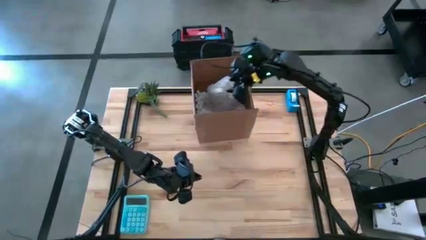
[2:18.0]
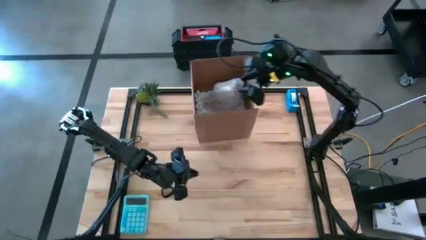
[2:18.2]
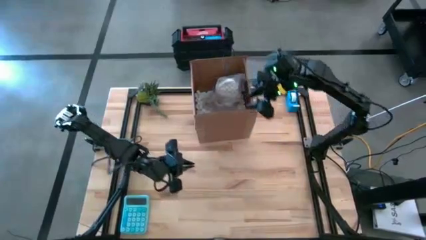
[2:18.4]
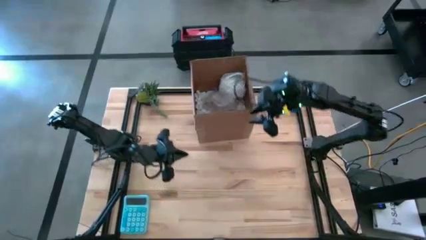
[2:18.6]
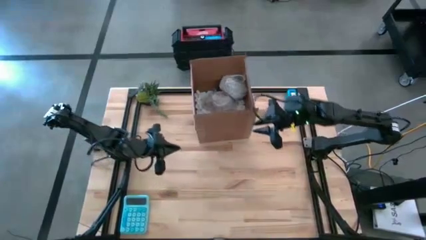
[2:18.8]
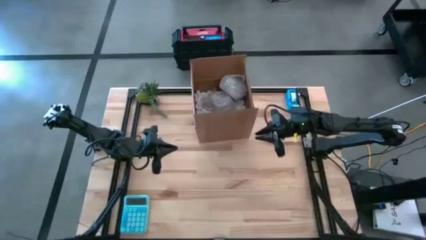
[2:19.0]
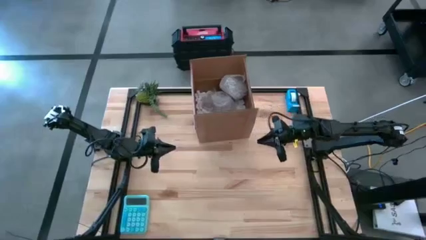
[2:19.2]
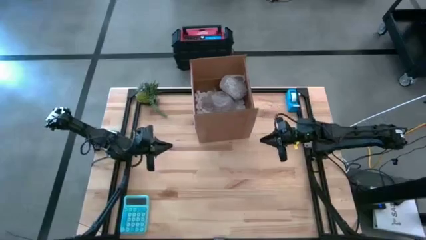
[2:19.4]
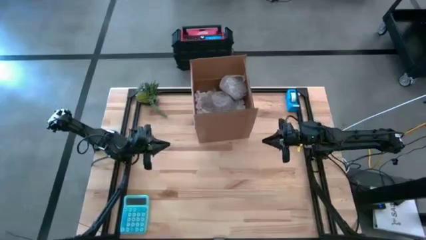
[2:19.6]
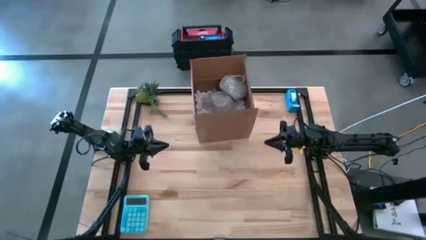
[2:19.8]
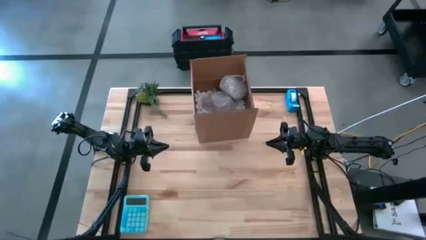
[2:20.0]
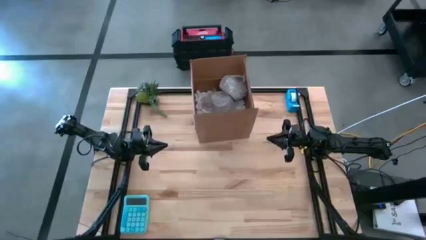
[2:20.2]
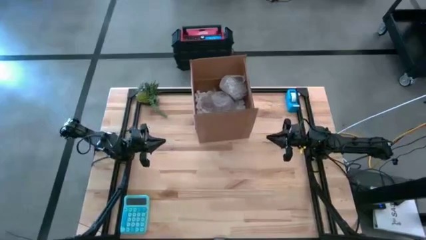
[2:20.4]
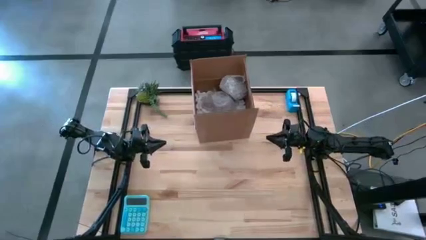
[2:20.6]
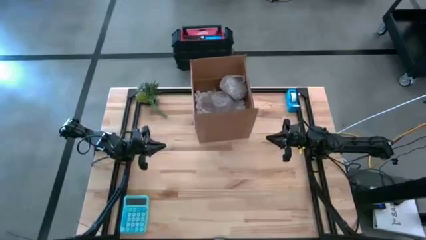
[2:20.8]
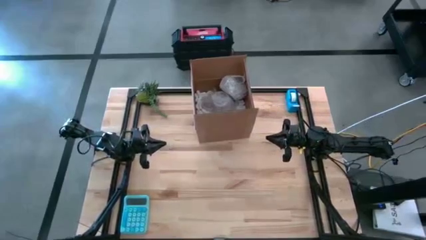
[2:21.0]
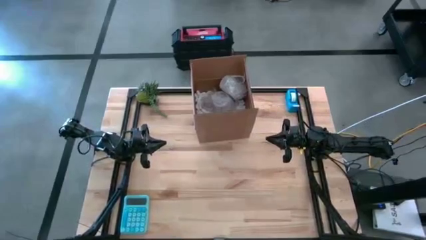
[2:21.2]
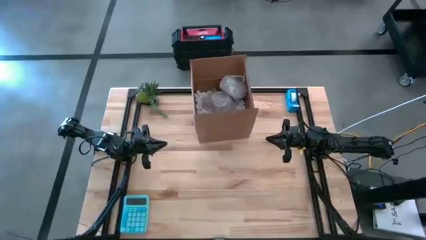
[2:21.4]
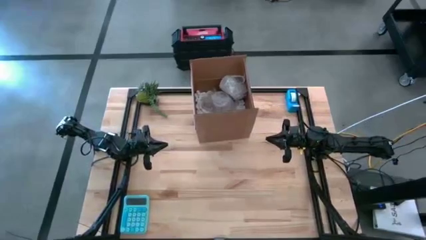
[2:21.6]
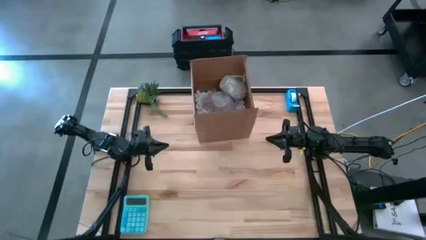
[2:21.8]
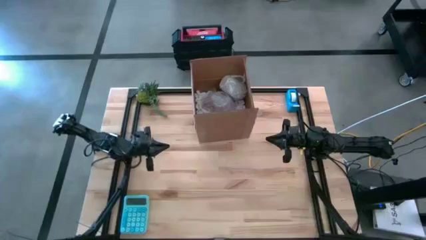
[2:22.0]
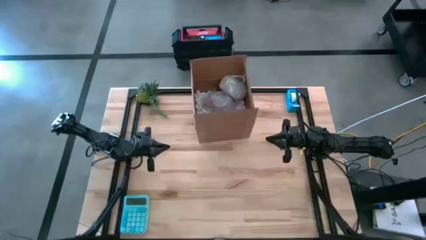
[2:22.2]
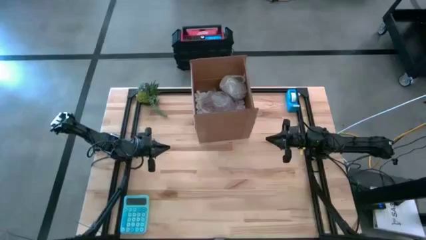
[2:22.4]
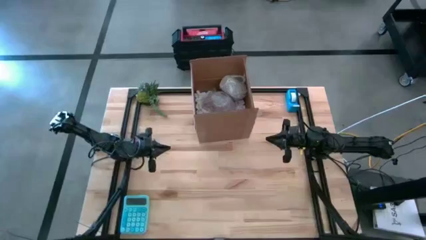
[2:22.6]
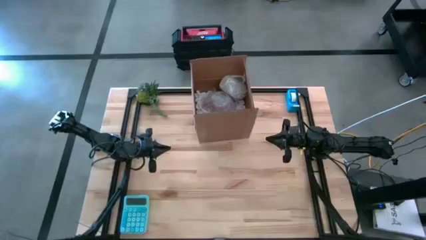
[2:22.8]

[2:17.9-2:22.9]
Task: wrap mug
Return to Home Position

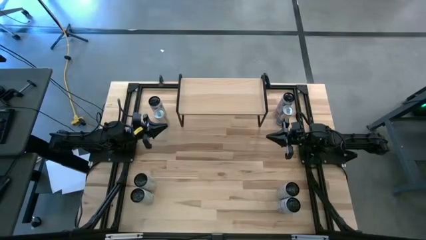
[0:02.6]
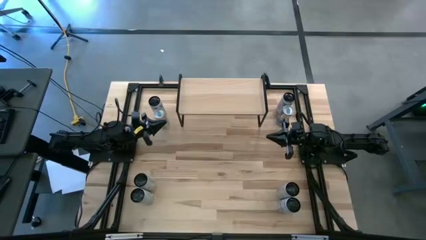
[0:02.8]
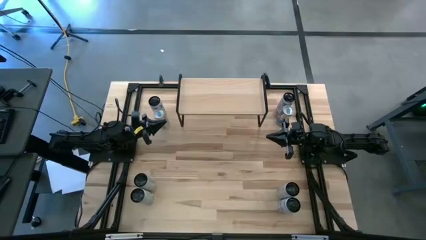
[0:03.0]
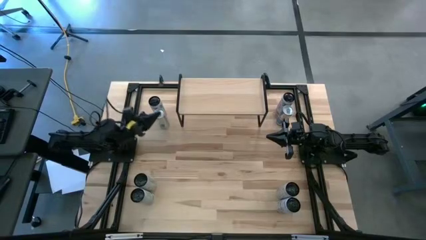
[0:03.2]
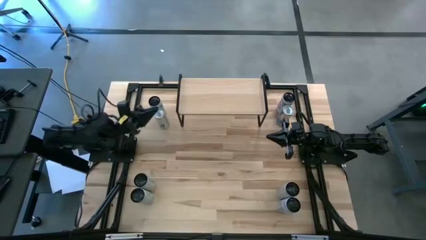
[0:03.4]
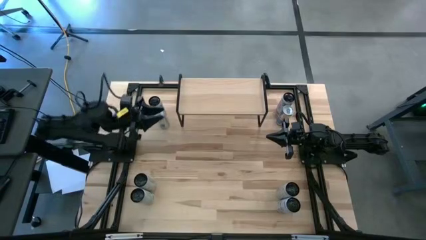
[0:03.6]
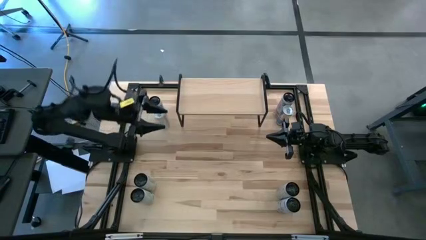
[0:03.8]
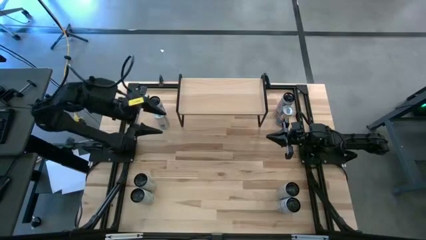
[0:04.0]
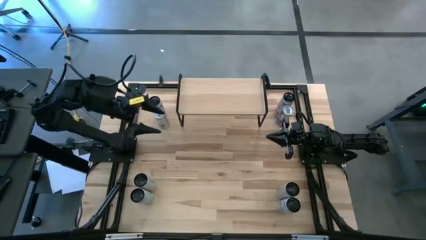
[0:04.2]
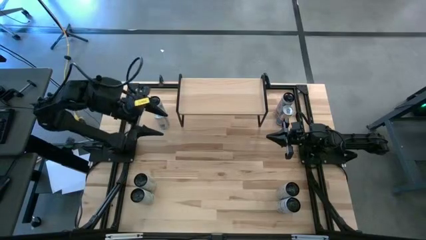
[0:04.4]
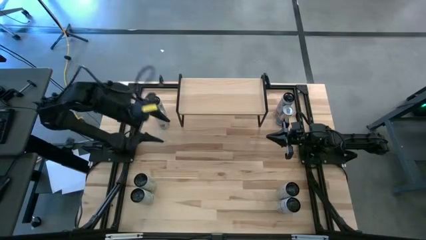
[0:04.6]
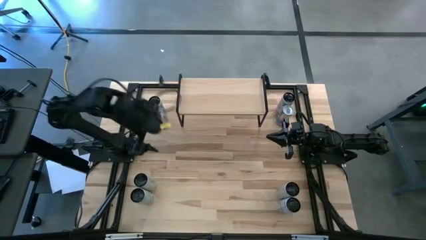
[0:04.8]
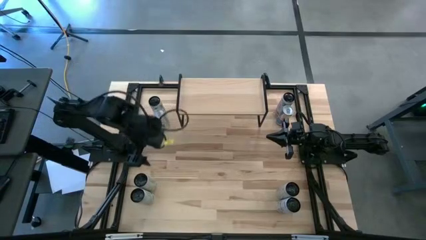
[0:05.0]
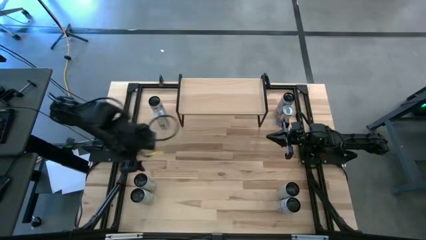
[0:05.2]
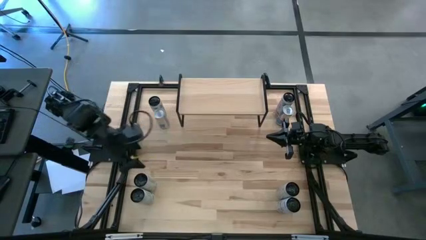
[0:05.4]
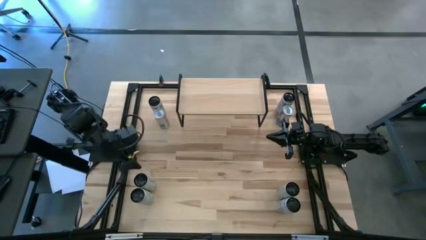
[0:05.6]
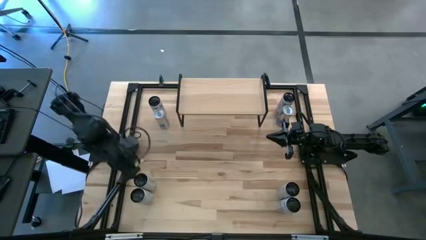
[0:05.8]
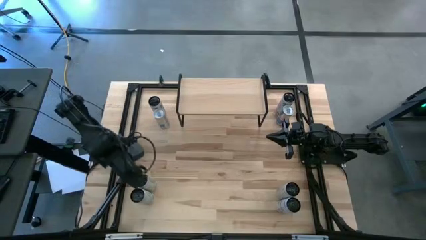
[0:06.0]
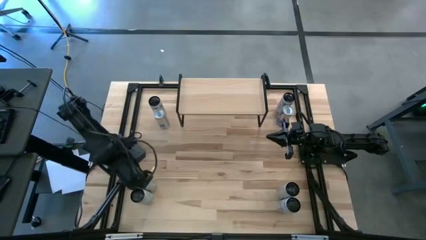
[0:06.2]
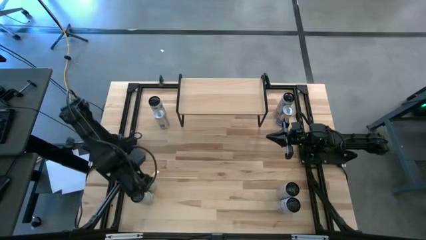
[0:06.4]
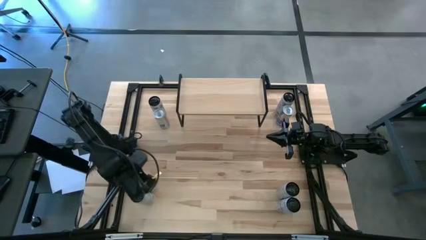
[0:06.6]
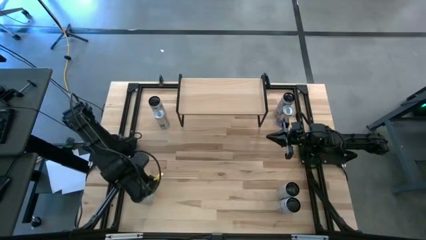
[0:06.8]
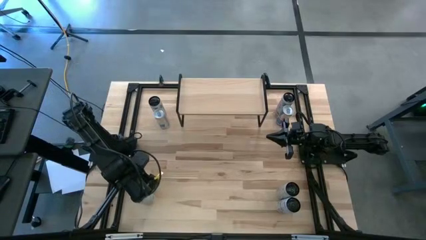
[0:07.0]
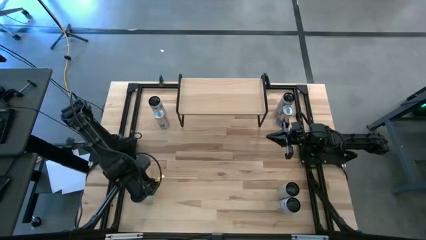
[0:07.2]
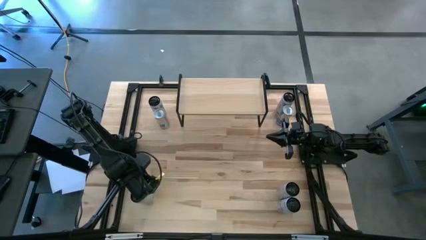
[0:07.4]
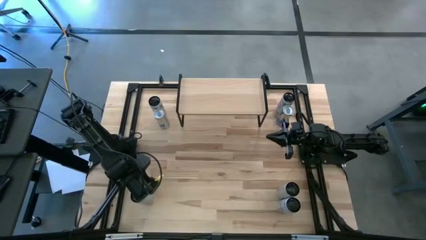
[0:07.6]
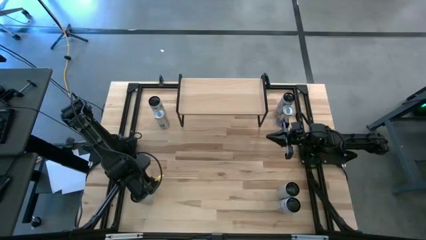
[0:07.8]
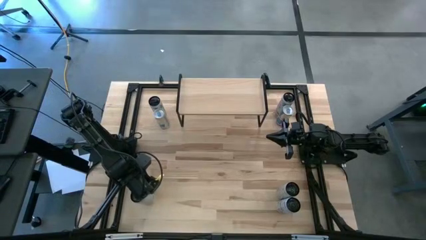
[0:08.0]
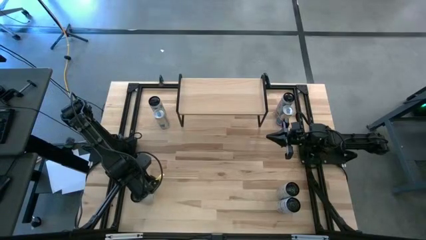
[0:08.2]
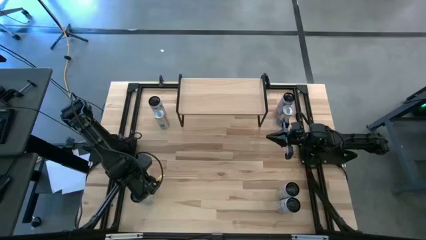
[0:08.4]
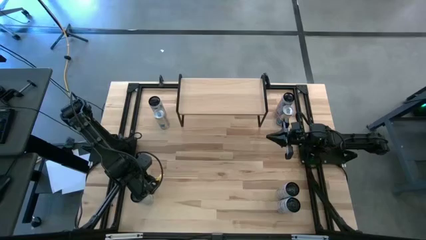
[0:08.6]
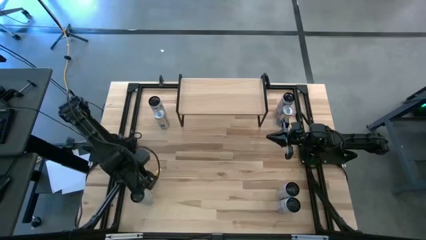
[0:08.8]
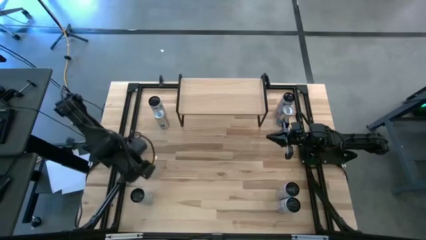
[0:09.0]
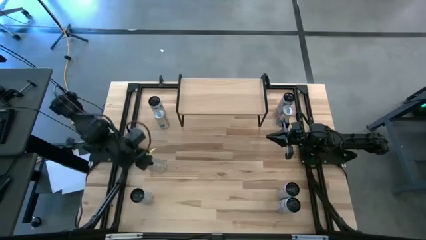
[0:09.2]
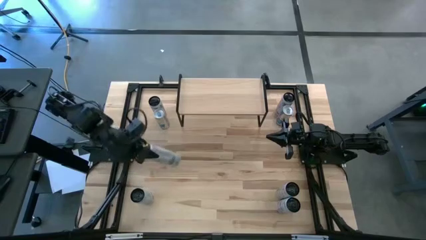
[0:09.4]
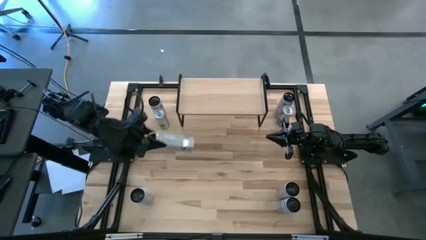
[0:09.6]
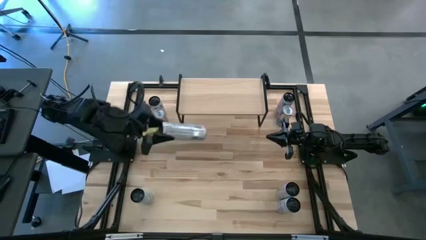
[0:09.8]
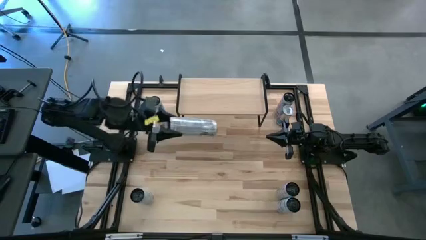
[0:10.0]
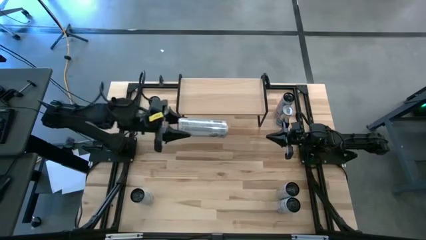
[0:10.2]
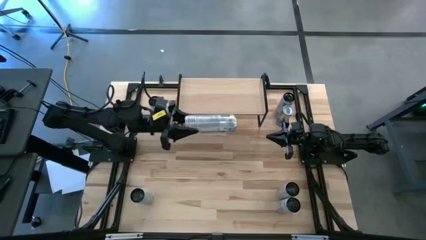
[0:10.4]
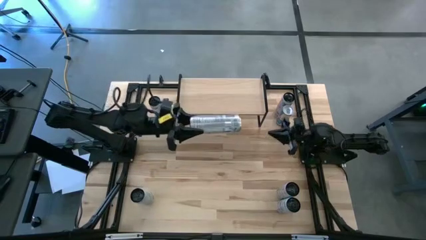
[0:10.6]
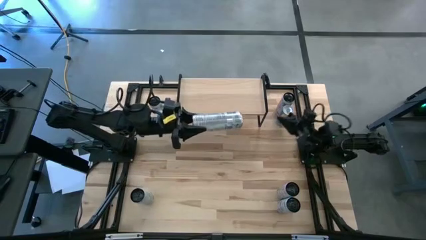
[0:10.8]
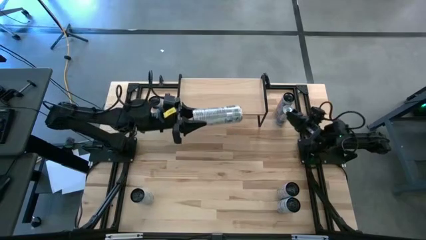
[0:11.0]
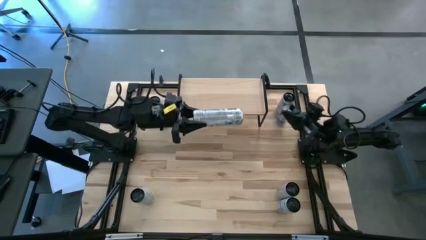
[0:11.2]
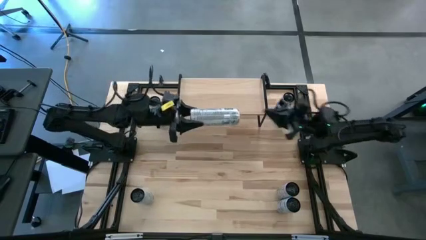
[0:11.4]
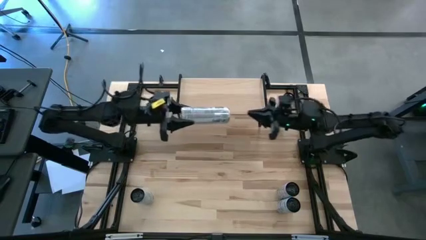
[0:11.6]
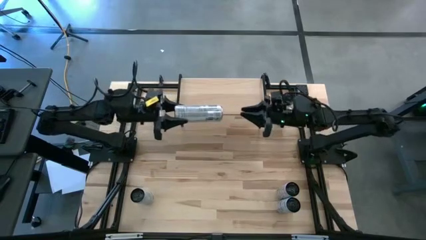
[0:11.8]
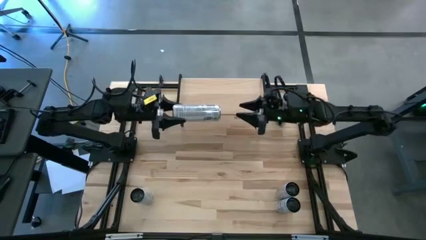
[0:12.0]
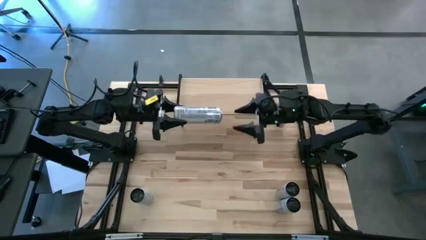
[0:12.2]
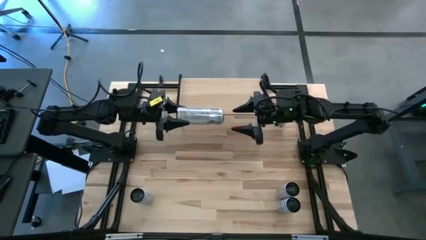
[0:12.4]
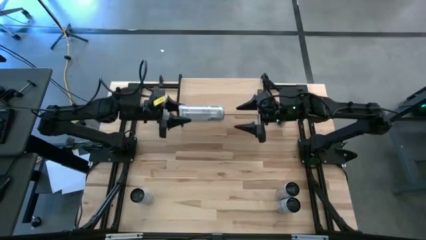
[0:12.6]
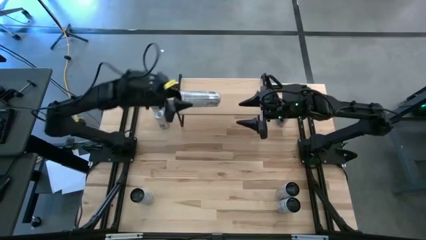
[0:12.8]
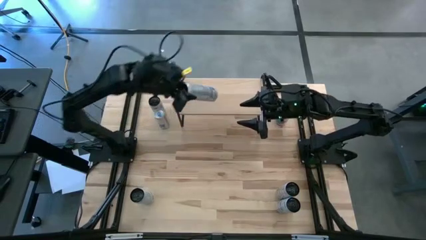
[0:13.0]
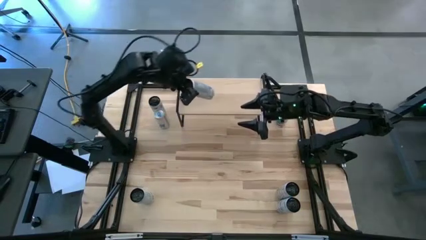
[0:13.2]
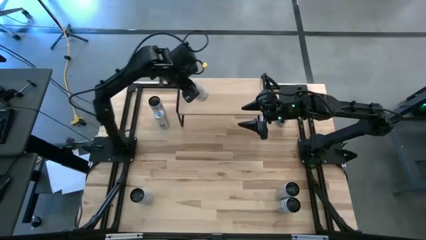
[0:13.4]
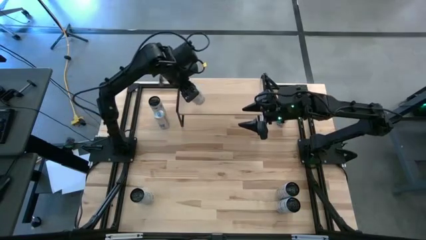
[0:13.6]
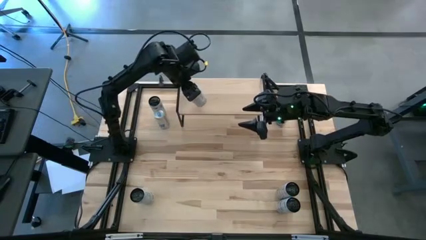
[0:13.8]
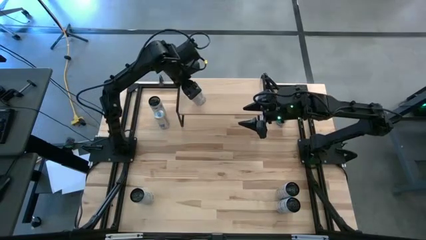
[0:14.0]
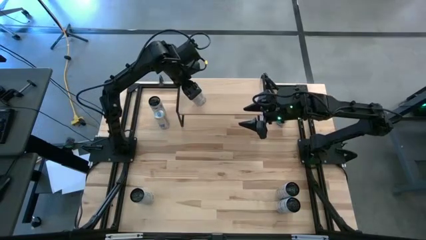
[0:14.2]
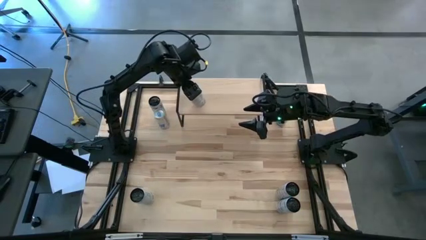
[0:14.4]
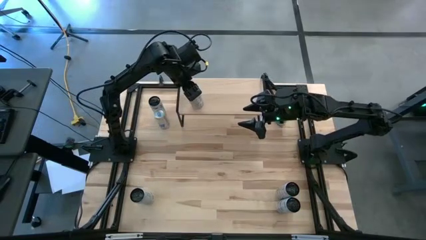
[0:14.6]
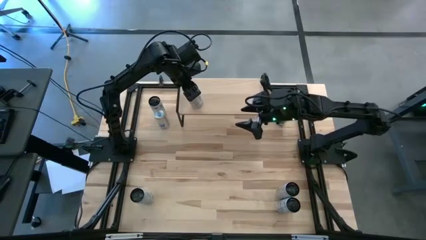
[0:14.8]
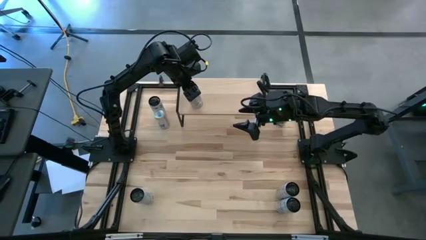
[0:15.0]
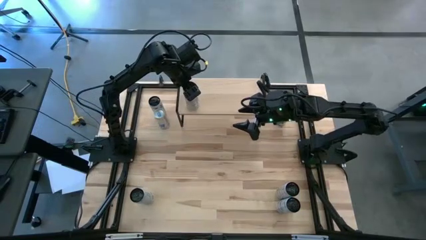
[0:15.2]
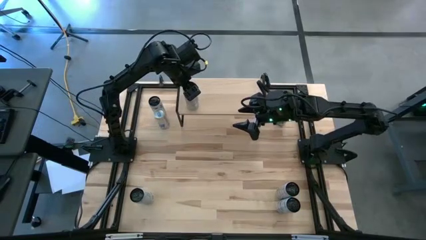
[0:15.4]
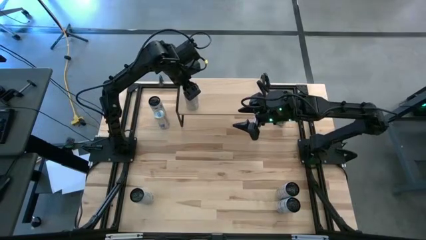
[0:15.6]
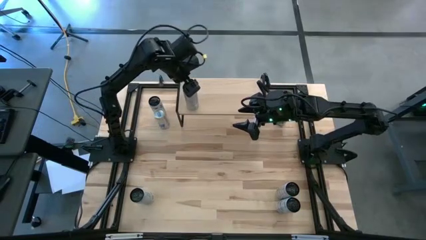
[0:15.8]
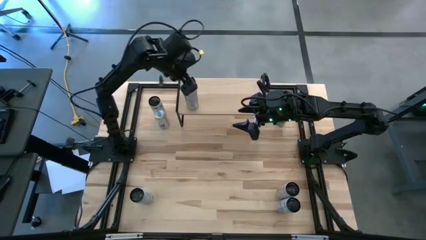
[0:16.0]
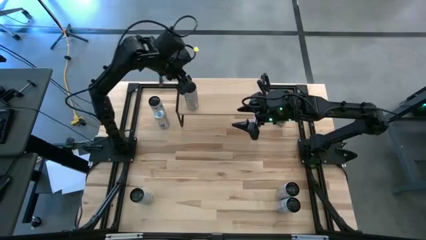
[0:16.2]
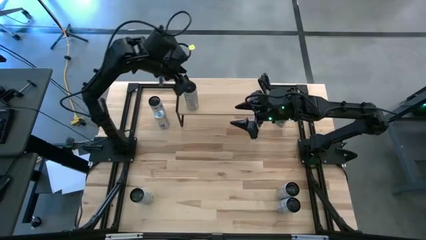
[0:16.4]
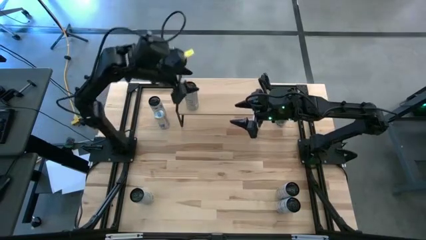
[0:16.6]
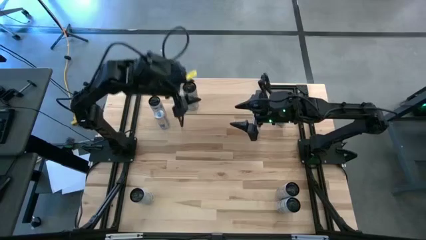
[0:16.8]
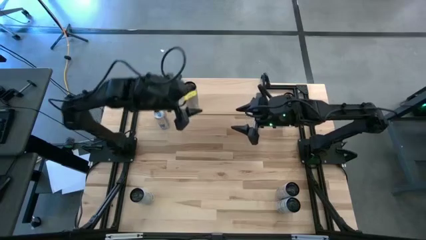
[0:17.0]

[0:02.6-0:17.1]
Task: Place canned beverage on shelf
Put the bottom left black soda can on the shelf
